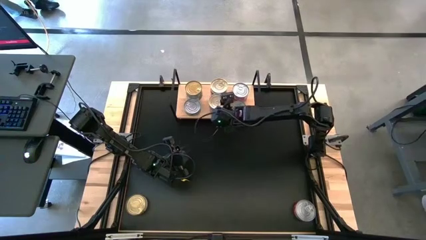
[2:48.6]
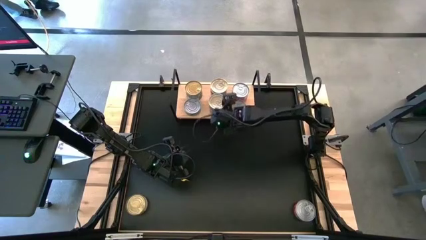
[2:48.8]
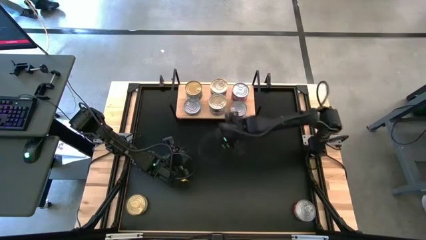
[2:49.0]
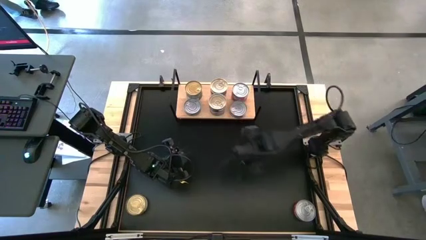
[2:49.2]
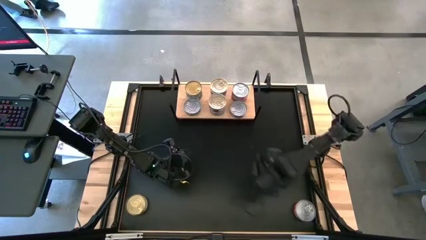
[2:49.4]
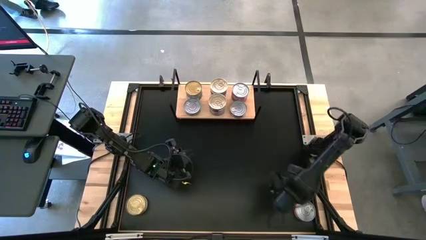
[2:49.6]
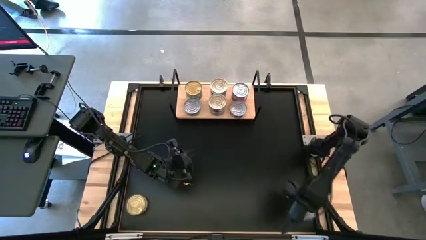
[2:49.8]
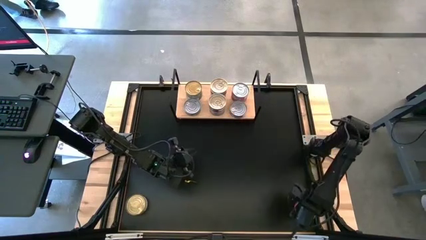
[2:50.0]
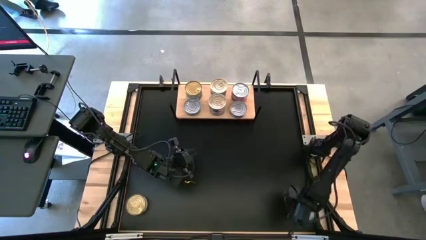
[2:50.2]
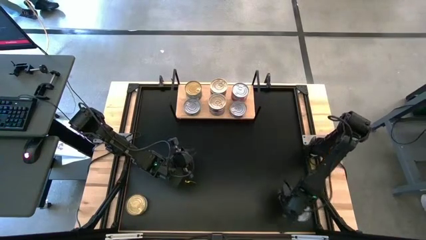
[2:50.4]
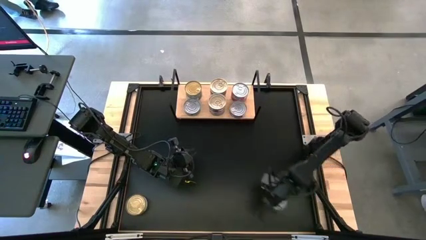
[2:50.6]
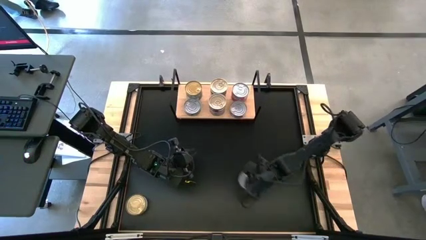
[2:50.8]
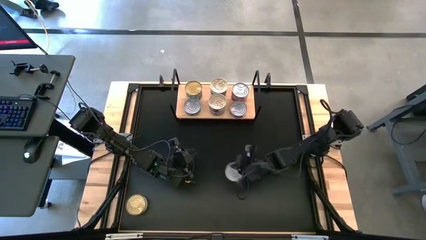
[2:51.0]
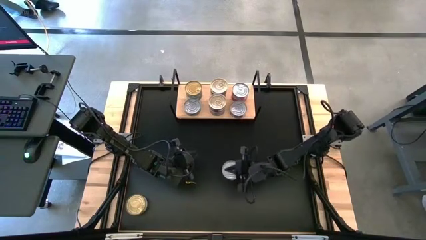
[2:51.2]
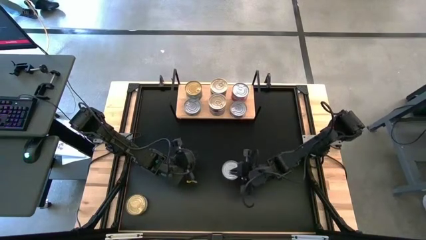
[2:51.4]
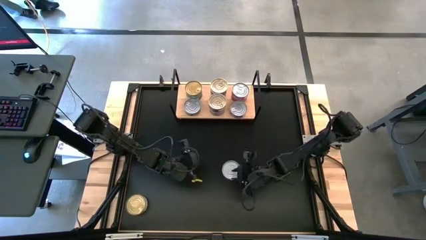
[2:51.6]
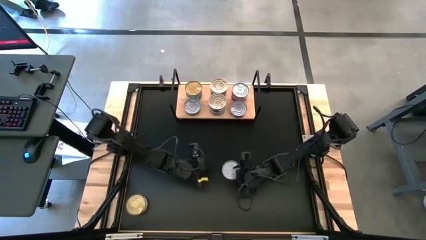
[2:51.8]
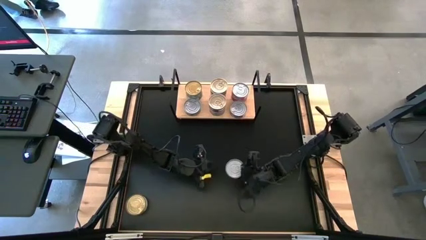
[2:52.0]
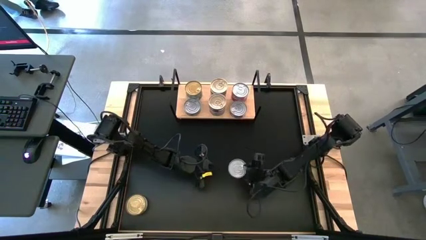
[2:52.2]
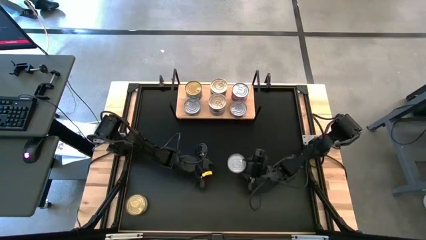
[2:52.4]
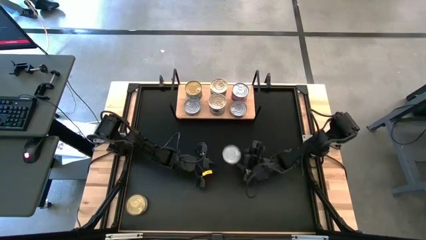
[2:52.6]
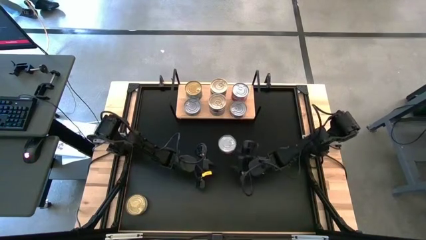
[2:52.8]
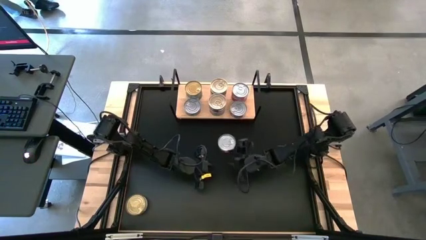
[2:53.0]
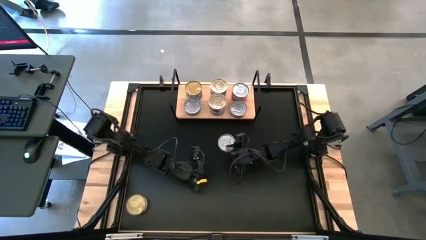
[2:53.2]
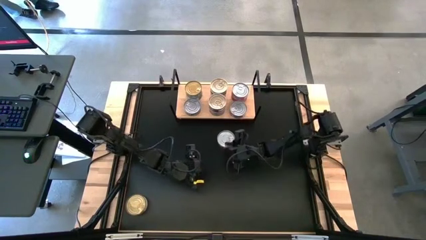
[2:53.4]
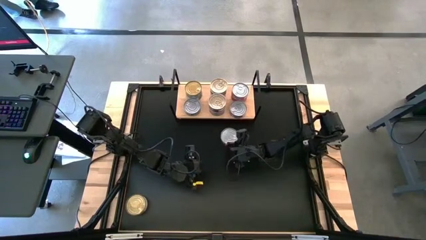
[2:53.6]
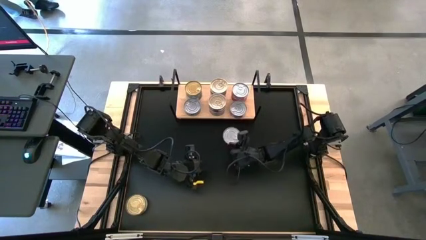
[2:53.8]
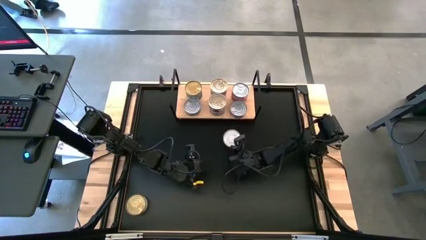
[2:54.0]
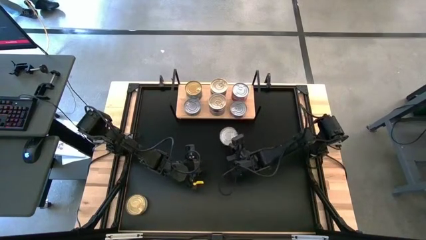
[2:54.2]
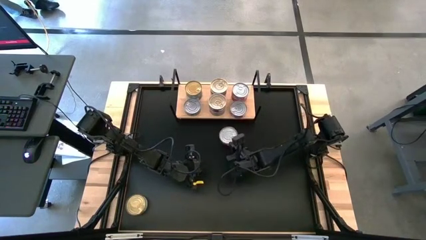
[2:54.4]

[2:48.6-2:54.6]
Task: Stack canned seafood by type on shelf
Stack the red tuna can on top of the red tuna can on the shelf

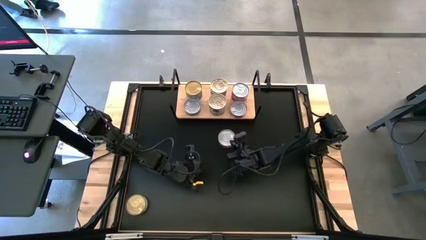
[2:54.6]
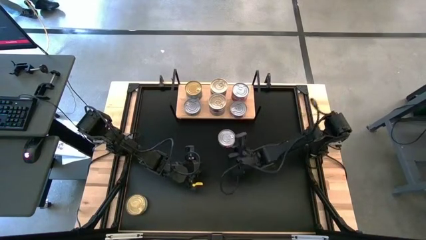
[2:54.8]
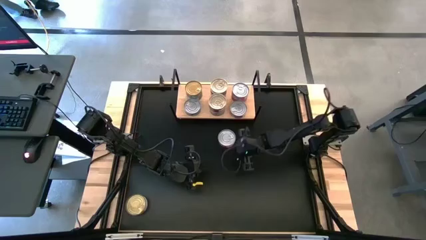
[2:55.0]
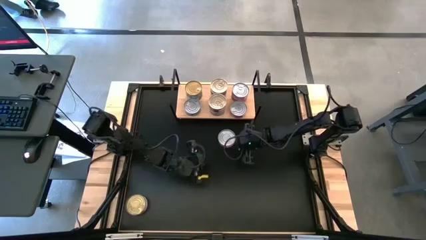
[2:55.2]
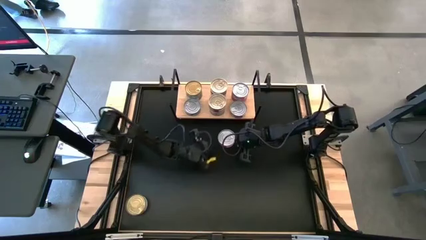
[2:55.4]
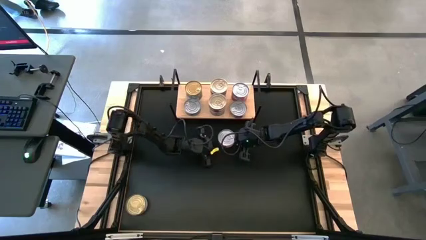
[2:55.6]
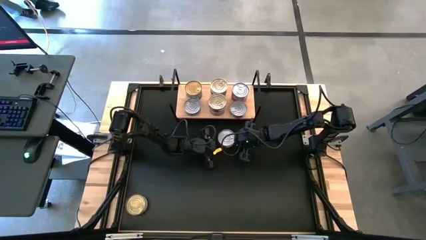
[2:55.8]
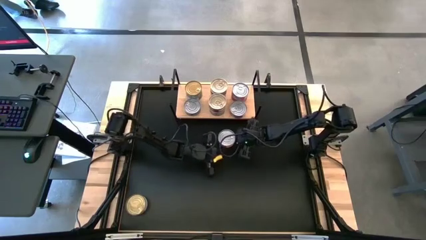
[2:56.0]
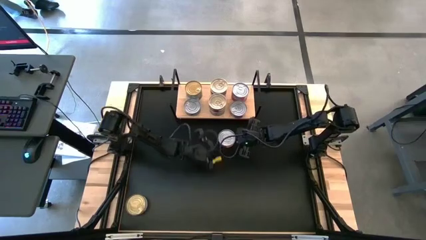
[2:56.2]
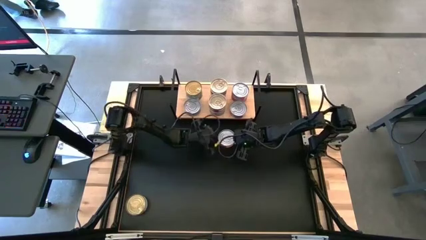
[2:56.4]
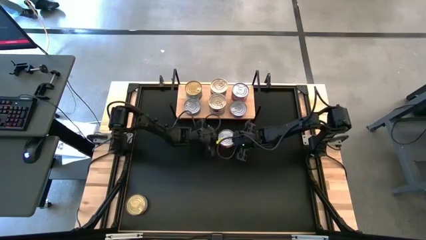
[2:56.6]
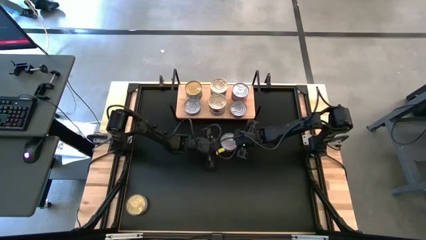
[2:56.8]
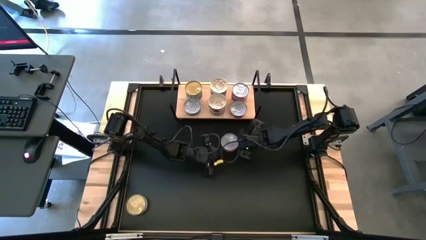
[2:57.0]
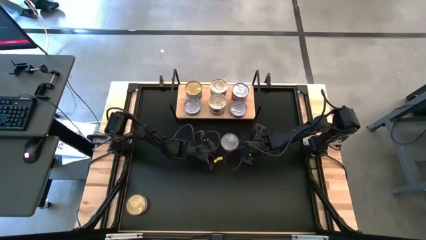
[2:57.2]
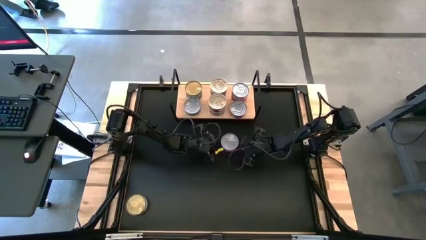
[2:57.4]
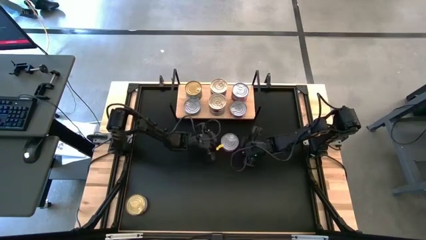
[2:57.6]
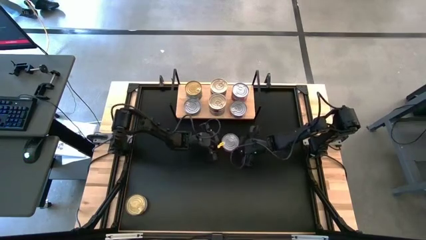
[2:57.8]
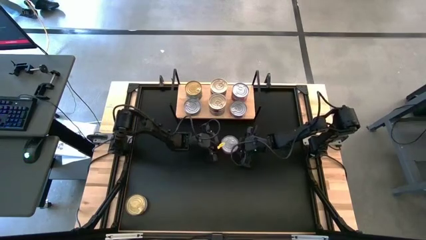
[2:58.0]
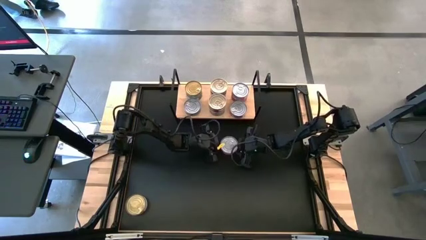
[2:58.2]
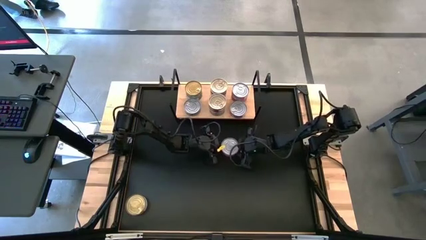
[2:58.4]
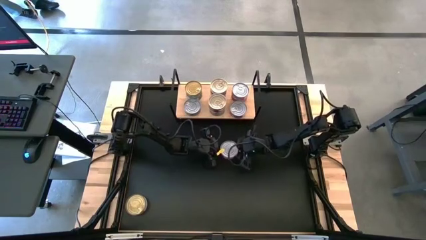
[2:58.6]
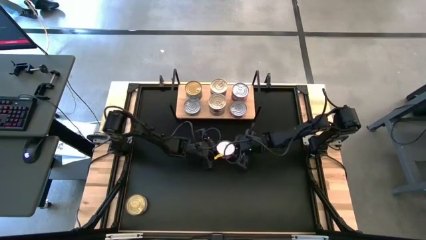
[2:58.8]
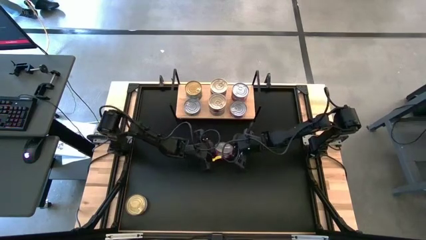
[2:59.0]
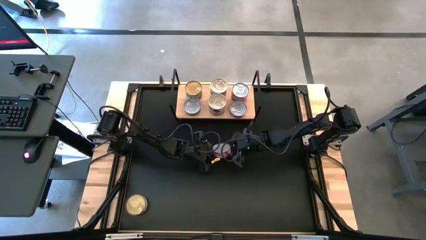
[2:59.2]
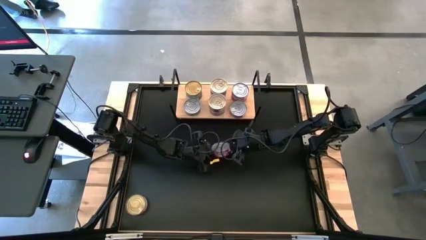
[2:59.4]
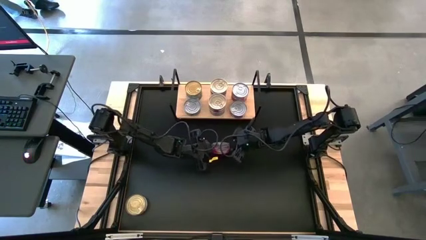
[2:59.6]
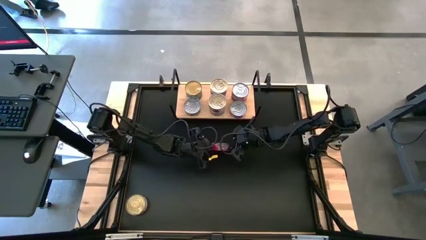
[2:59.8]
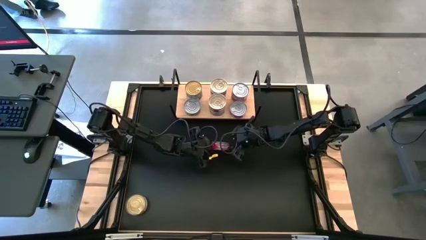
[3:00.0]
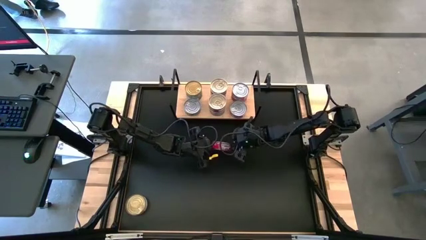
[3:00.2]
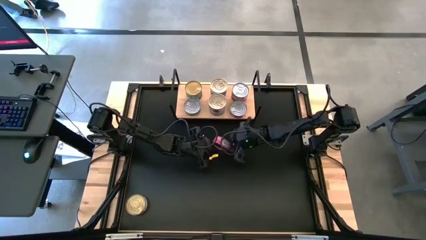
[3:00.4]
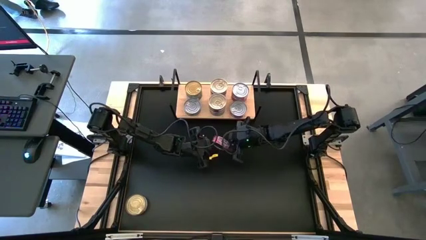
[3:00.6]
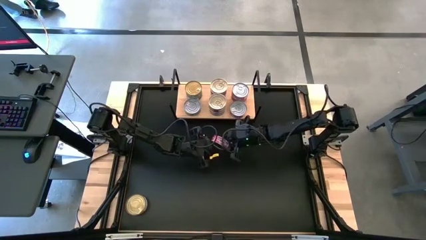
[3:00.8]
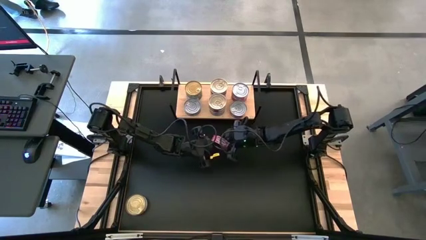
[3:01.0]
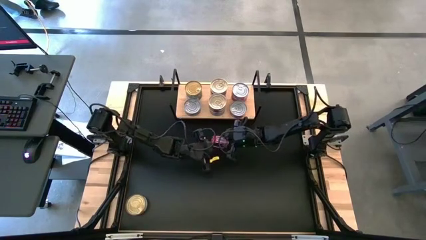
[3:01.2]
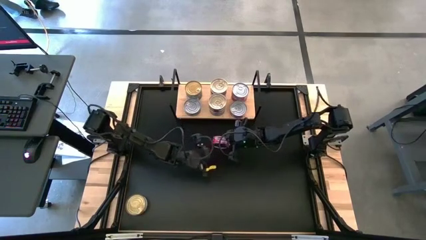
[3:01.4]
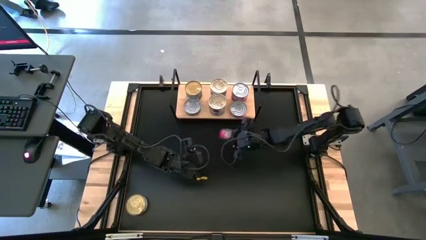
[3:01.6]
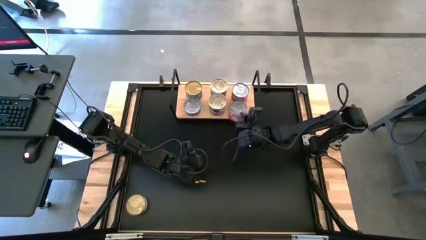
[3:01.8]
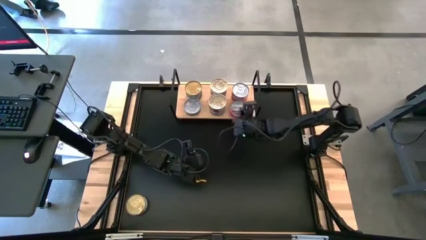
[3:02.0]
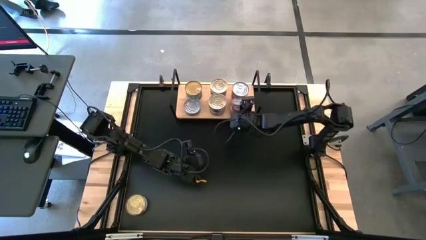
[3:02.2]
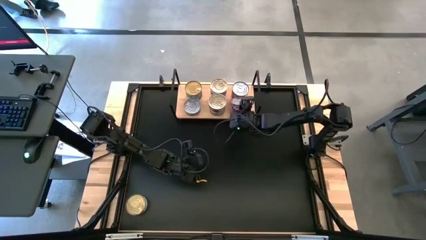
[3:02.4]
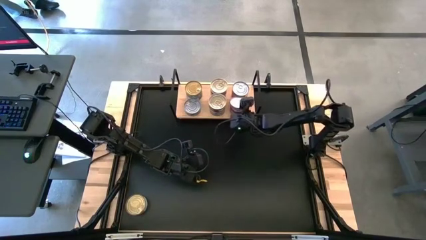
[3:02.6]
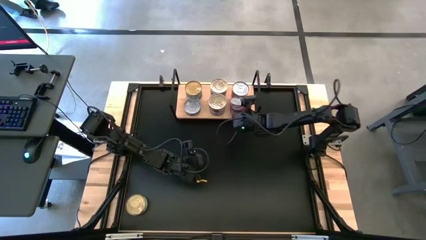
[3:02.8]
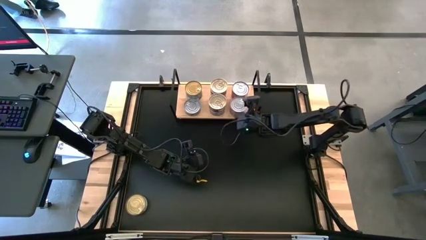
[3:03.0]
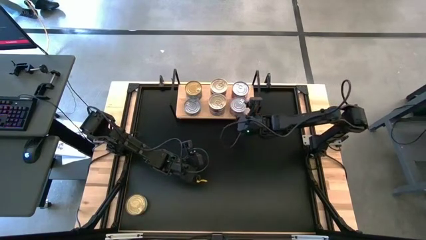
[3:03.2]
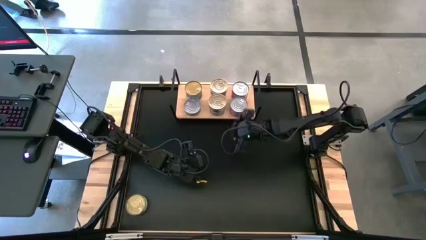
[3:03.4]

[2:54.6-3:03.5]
Stack the red tuna can on top of the red tuna can on the shelf

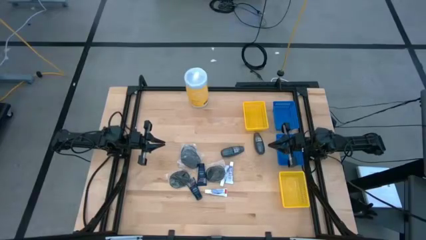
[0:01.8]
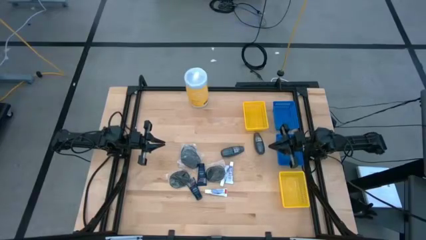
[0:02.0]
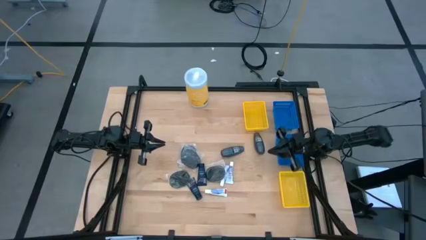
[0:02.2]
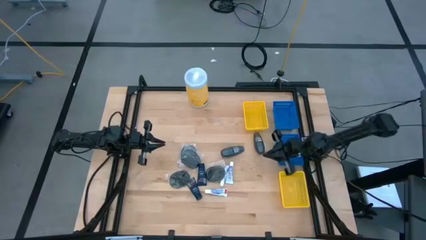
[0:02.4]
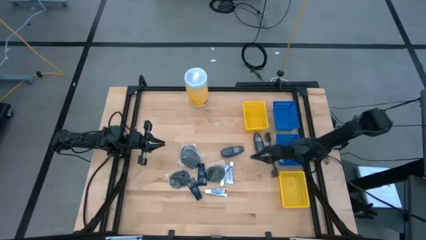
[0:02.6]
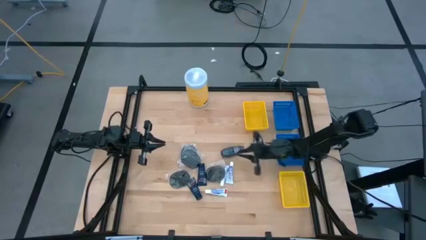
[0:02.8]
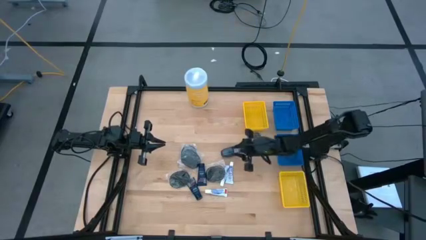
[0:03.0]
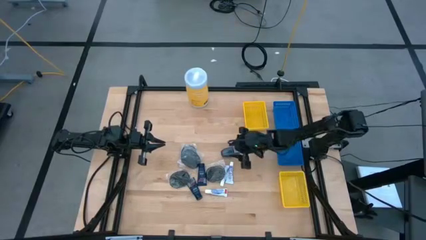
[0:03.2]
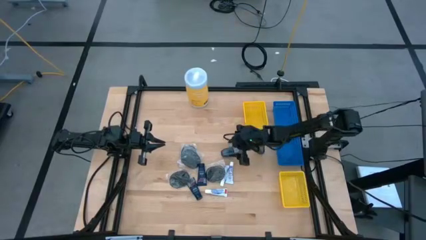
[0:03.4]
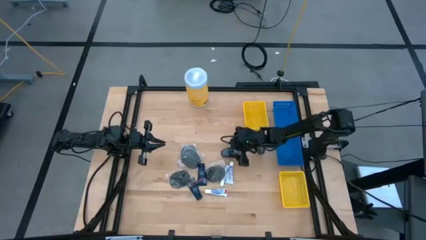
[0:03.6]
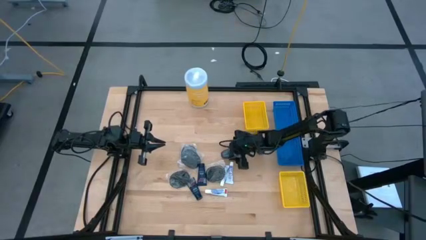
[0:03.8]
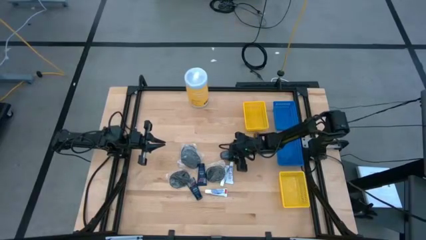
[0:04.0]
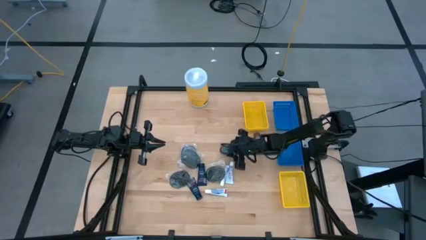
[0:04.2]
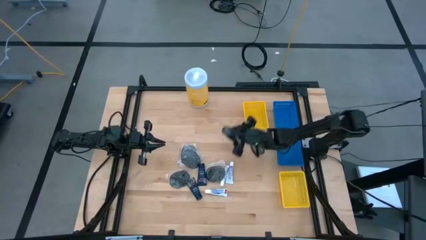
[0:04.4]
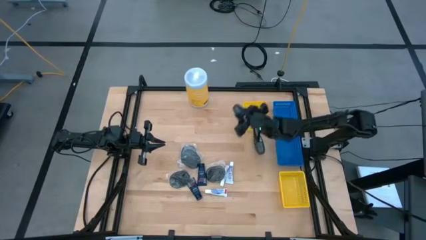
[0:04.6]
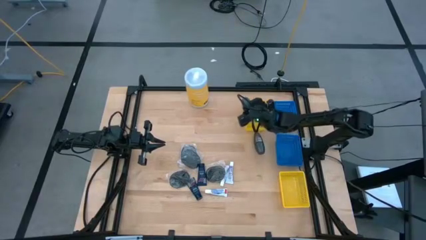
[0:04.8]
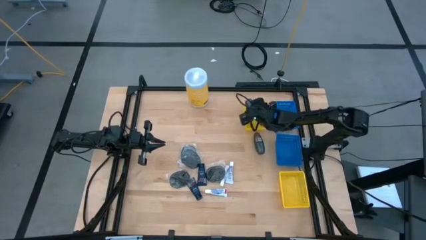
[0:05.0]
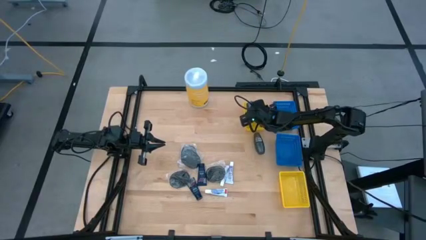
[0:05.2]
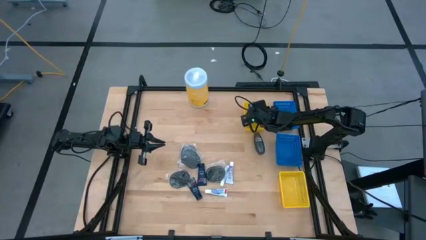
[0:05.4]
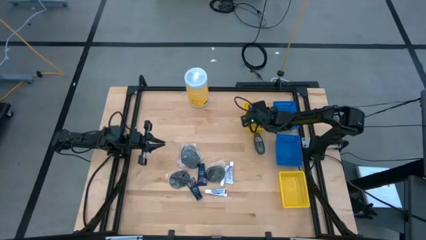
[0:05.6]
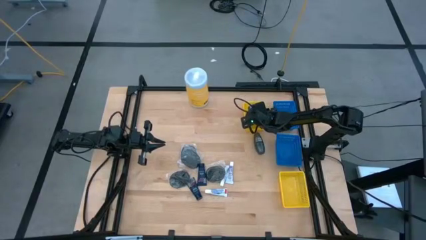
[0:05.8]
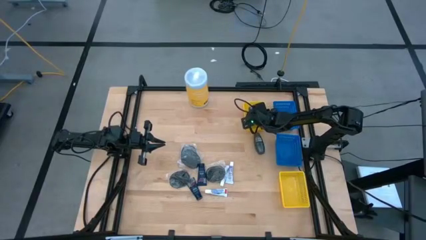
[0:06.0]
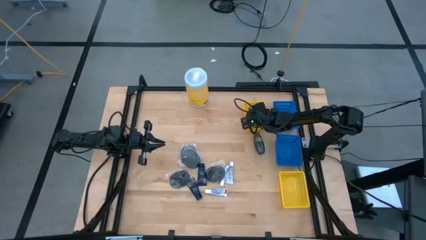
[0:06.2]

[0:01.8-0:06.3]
Task: Pick & Place Travel size toiletries
Put the left black deodorant into the top yellow basket
